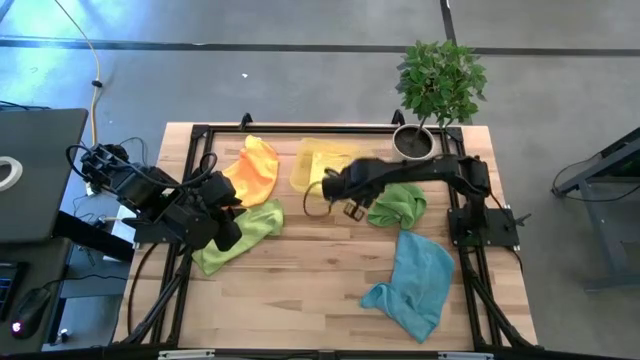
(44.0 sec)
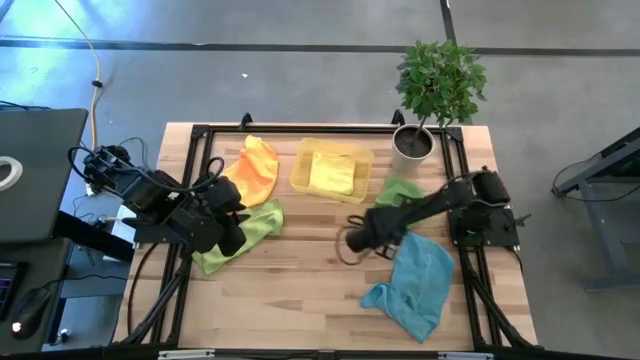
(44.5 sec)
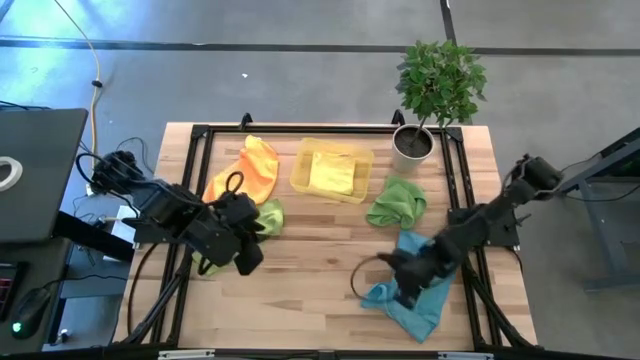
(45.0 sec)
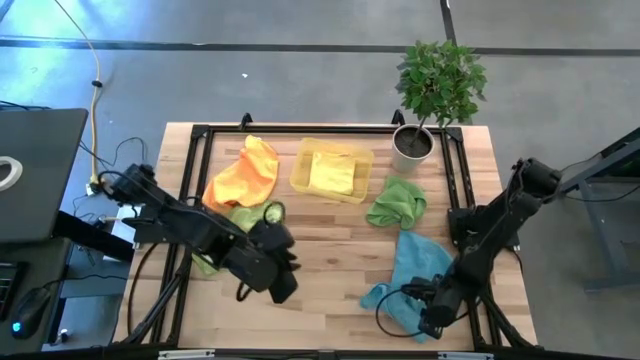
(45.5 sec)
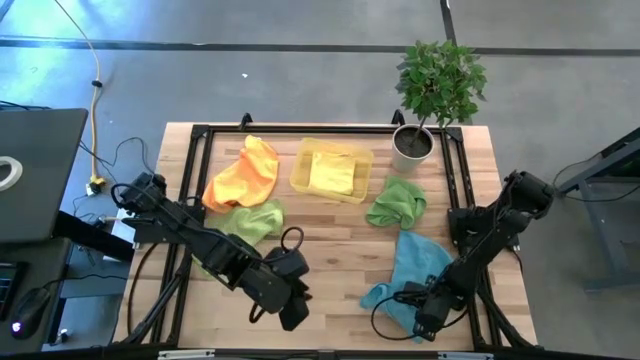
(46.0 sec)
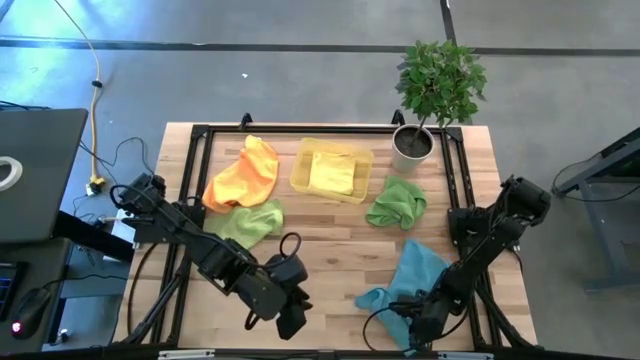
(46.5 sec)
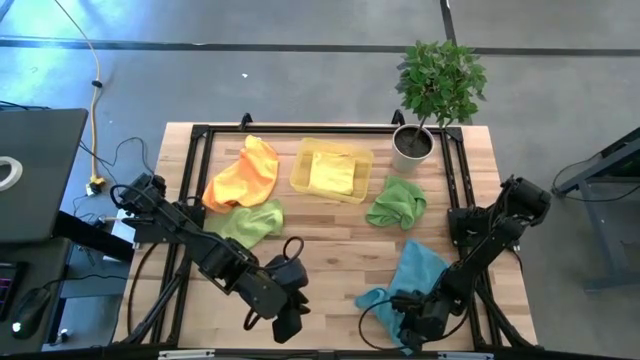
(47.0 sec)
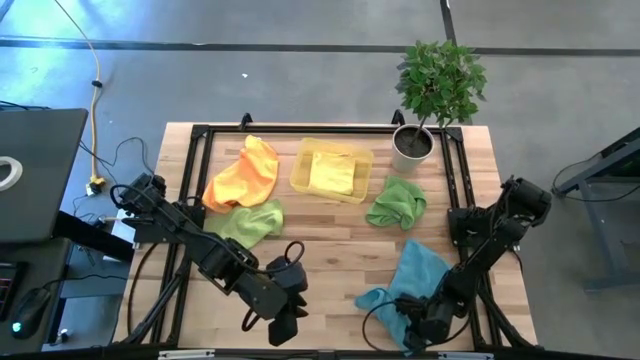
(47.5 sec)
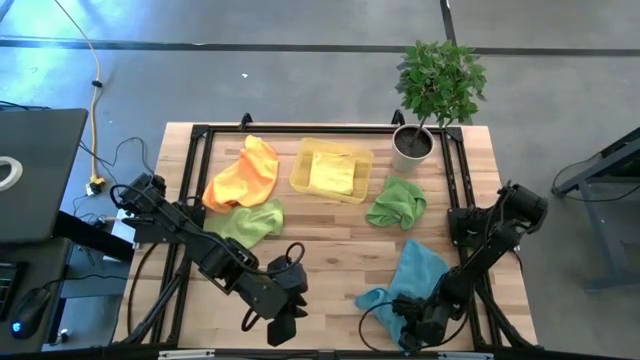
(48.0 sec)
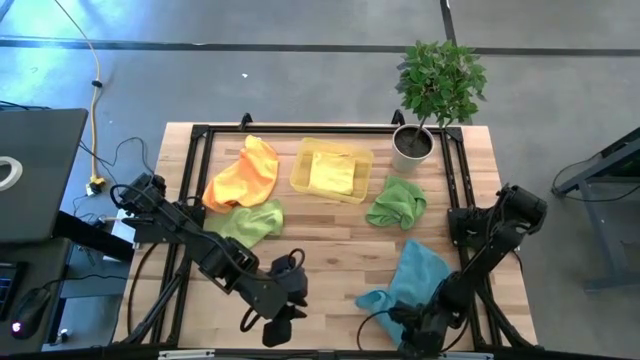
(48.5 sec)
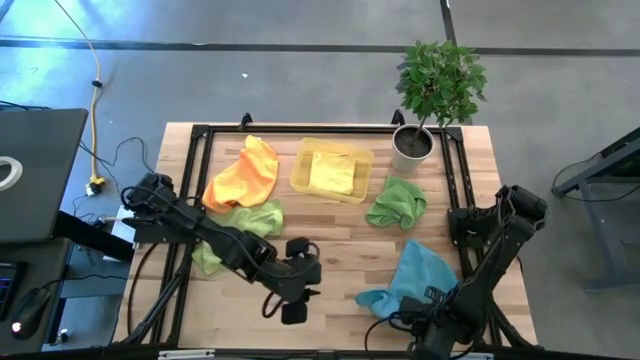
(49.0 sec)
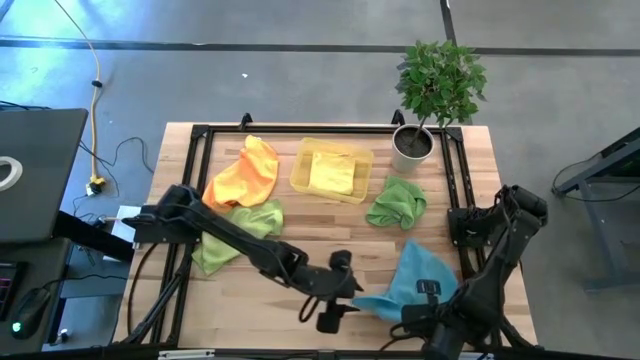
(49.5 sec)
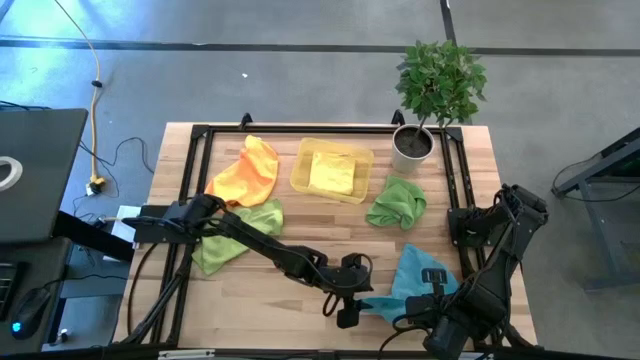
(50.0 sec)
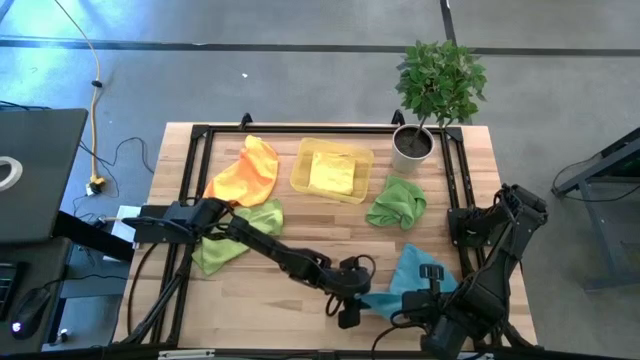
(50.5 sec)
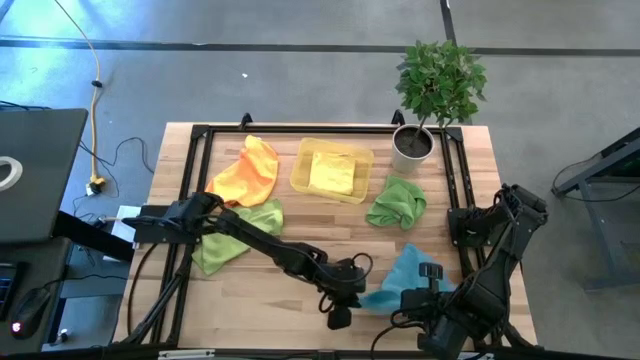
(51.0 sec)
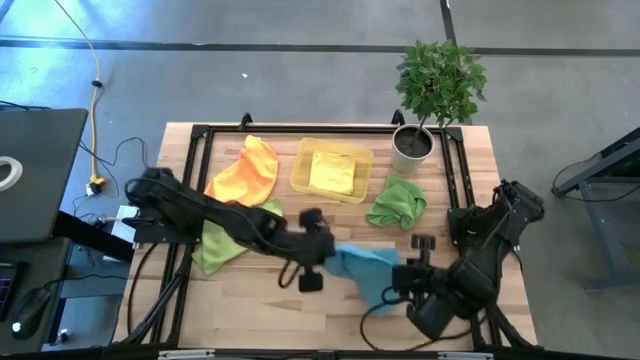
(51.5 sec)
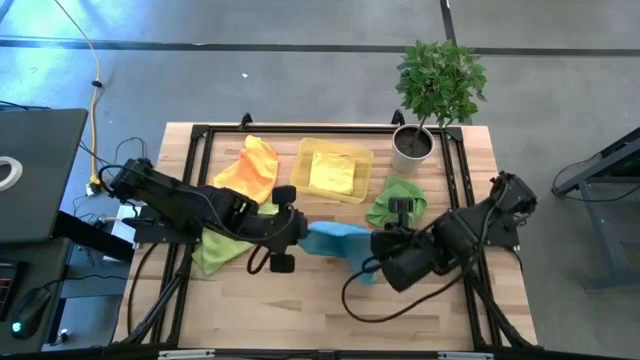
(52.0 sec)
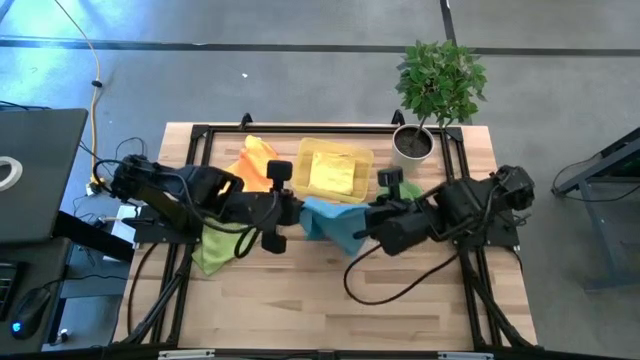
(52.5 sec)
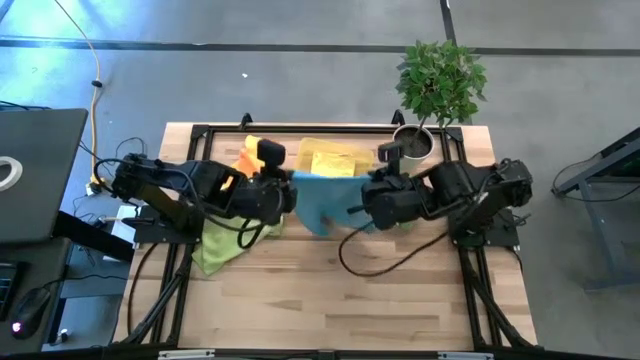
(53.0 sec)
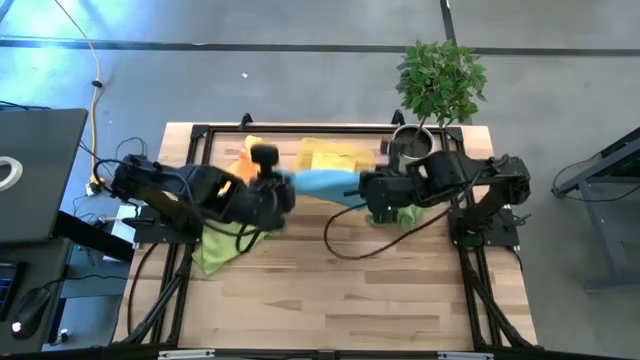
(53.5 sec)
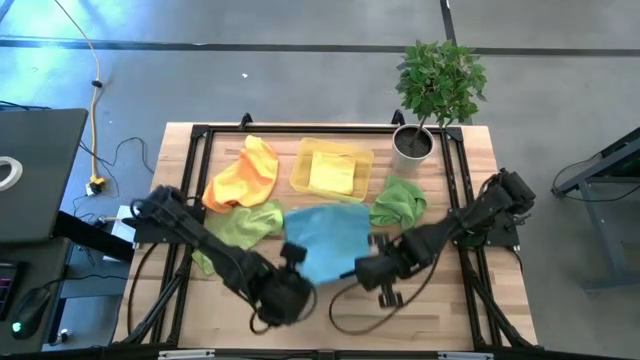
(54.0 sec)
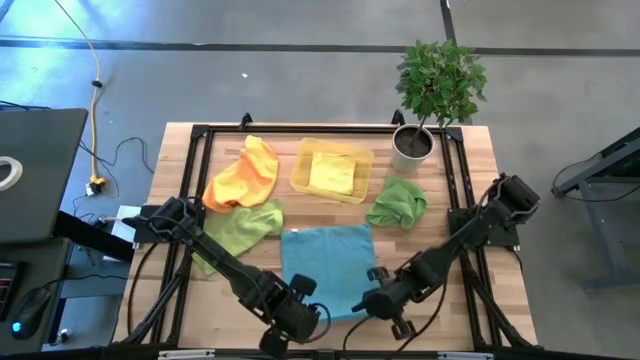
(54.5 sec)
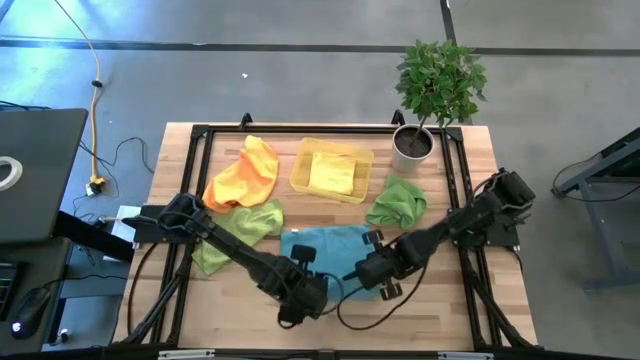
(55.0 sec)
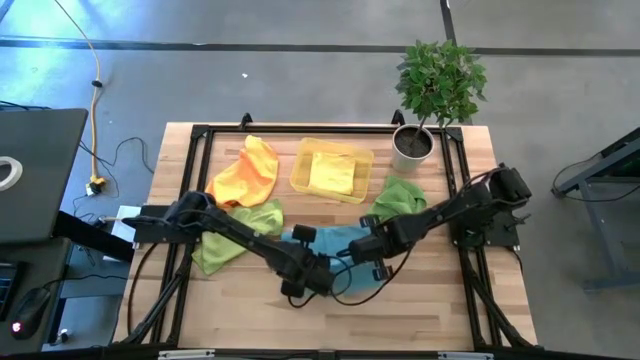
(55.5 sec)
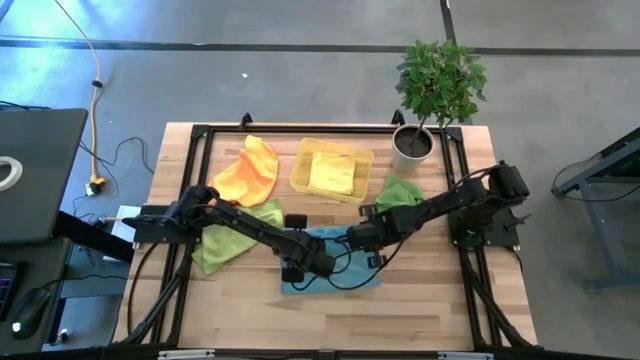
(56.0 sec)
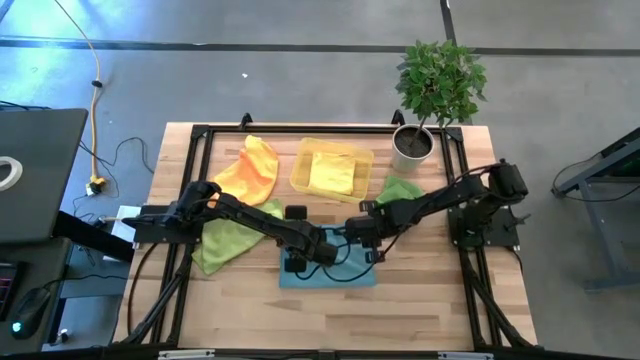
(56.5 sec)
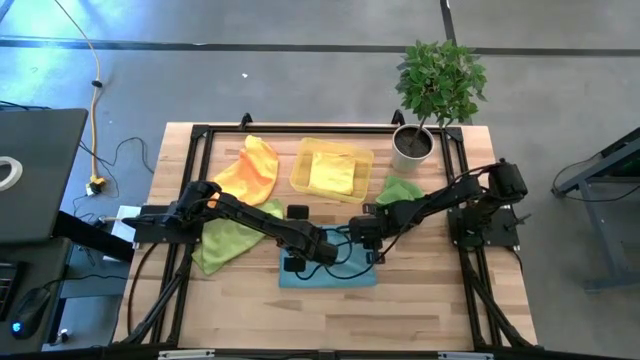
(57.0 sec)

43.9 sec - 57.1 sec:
Task: Fold microfiber towels
Fold the blue microfiber towel

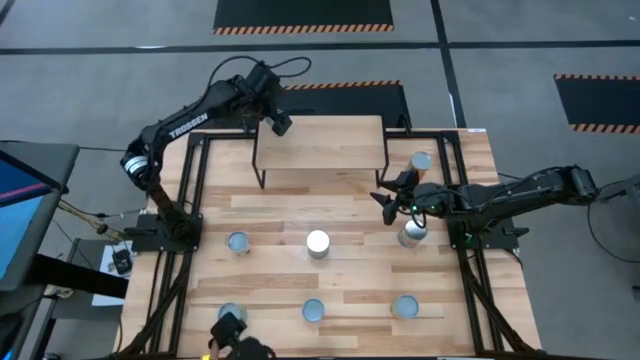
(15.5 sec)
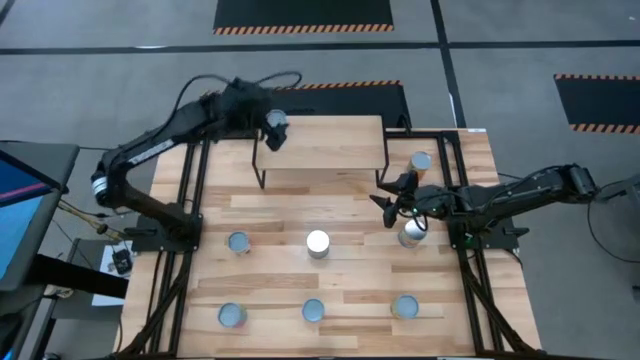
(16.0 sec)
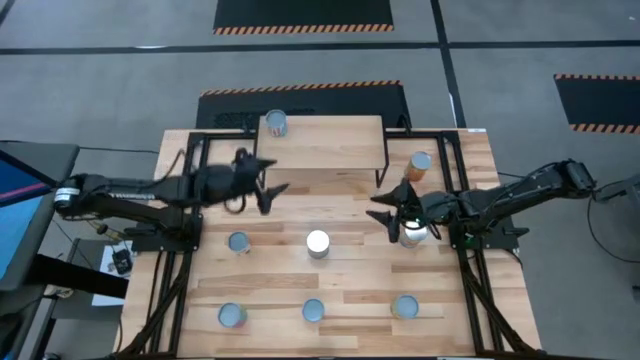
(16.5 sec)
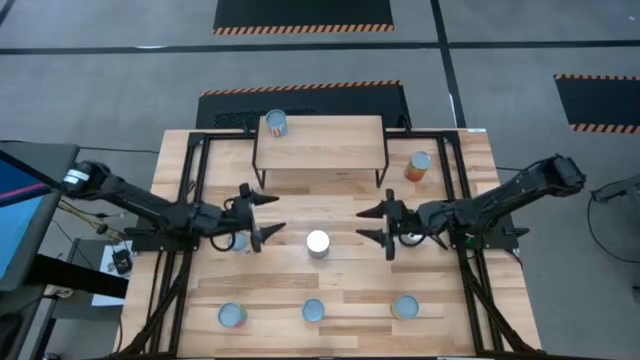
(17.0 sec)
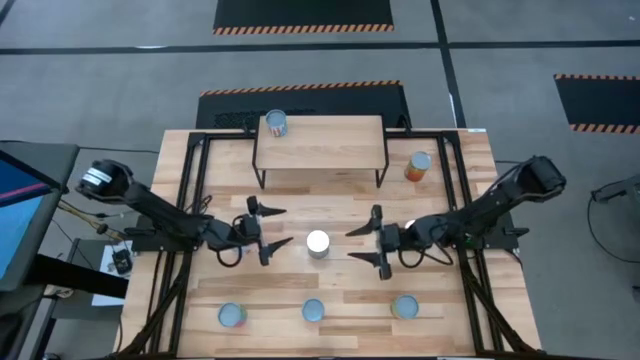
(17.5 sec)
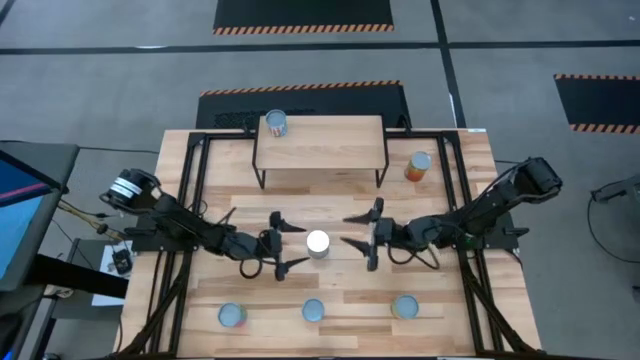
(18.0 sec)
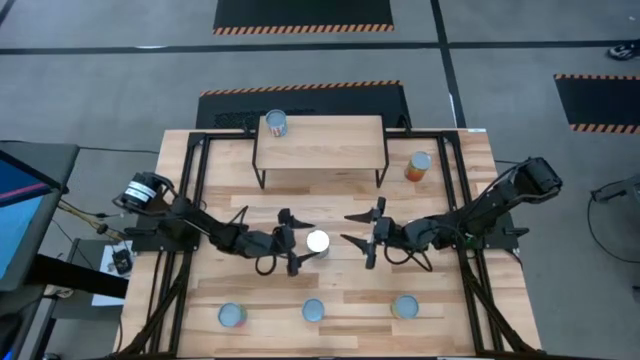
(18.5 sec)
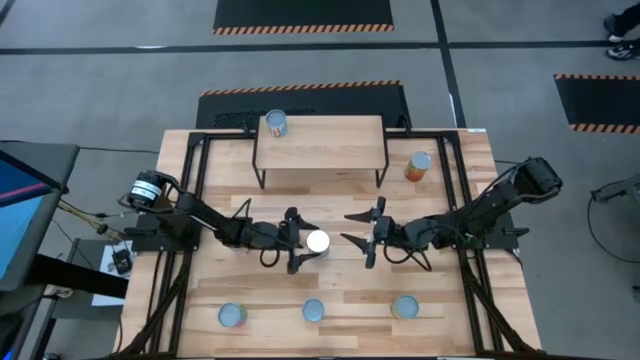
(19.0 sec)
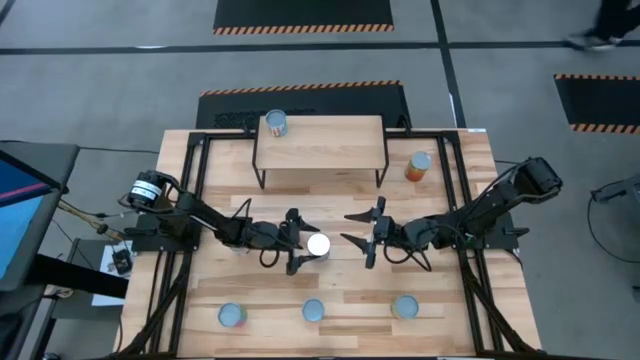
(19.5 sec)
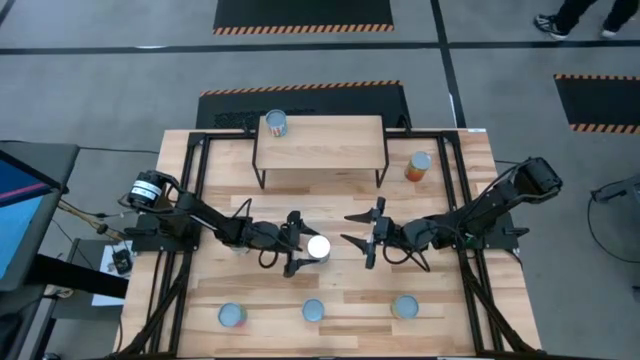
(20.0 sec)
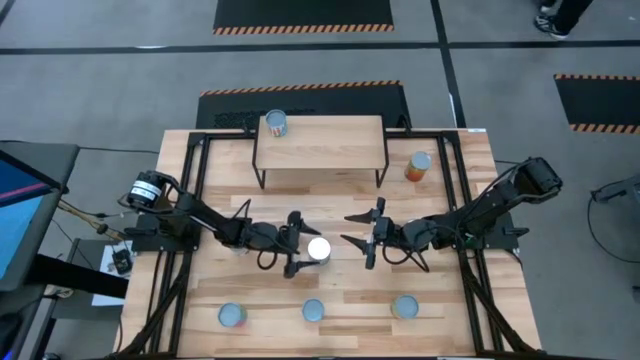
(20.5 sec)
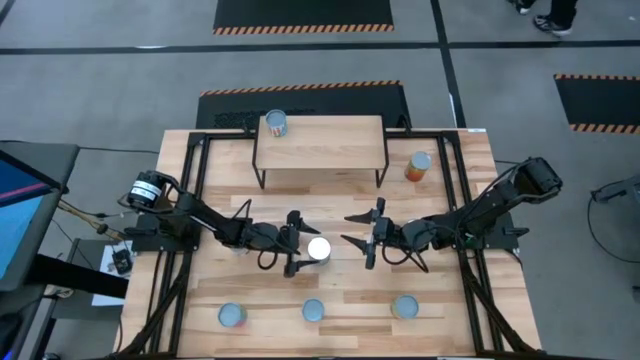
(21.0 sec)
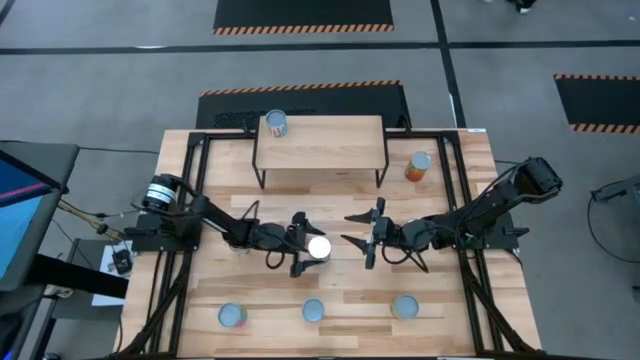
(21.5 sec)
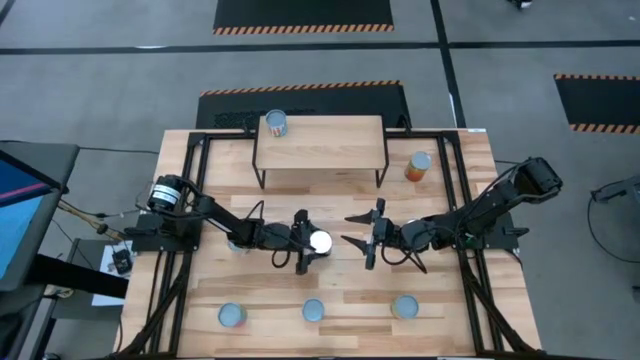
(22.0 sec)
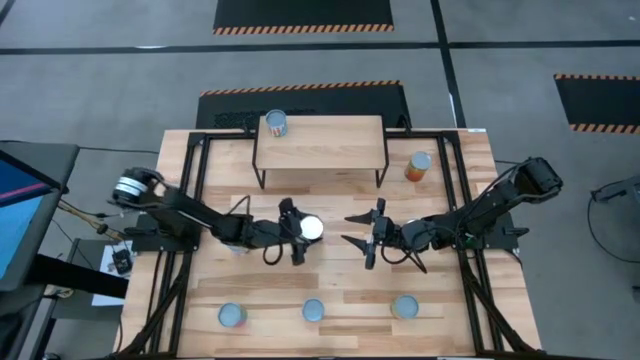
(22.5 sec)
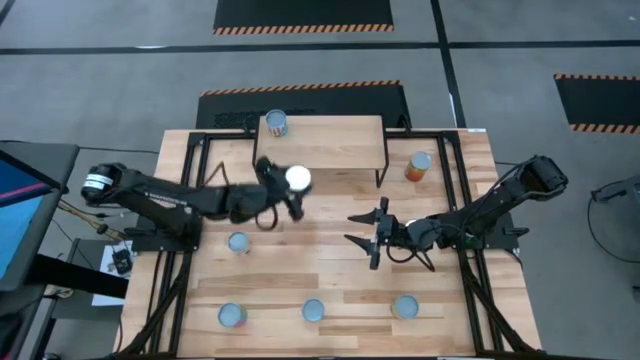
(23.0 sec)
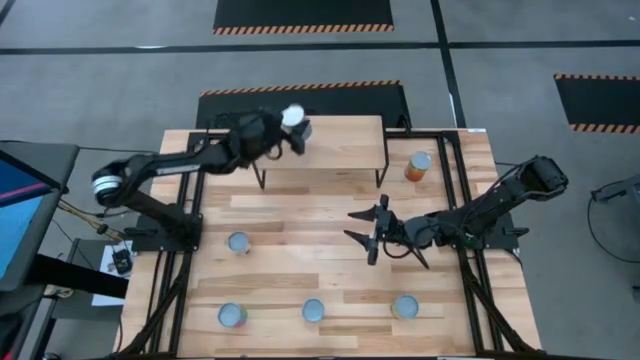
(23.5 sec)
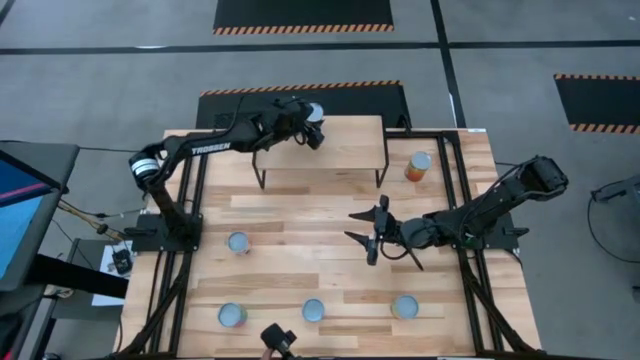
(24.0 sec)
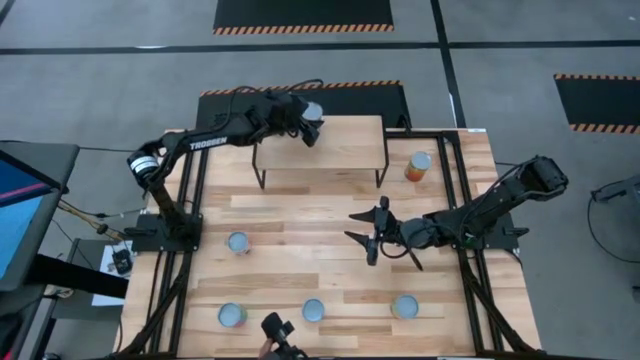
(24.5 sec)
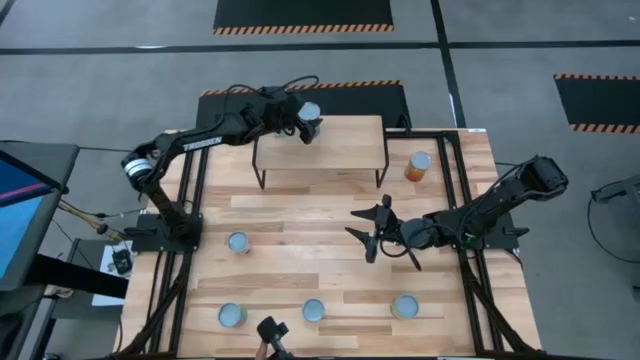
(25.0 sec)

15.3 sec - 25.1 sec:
Task: Pick and place cans onto a shelf
Put the canned cherries on the shelf
